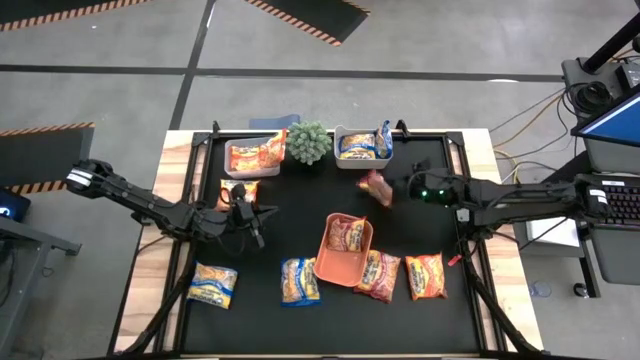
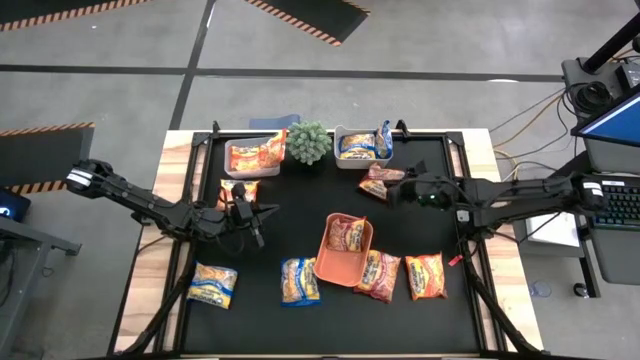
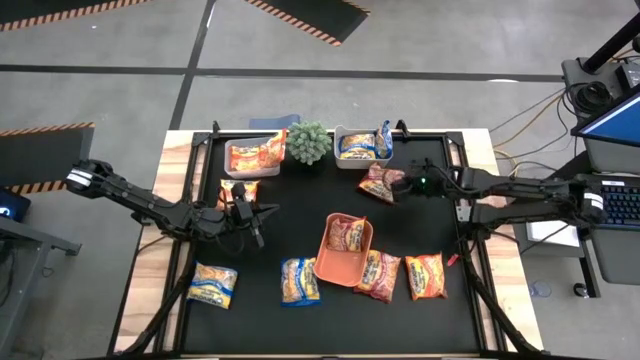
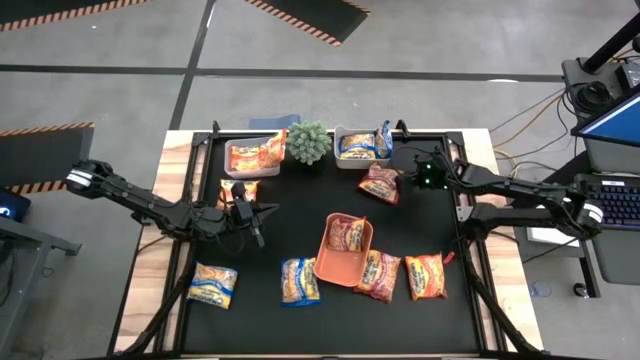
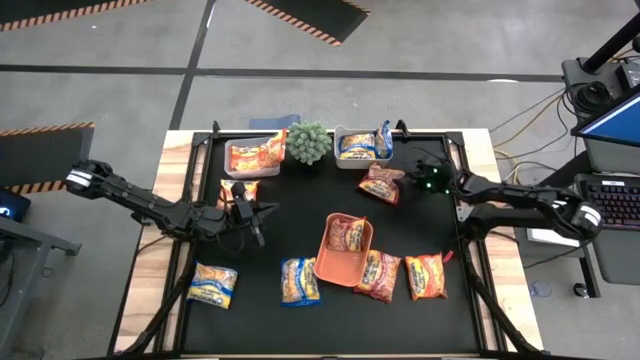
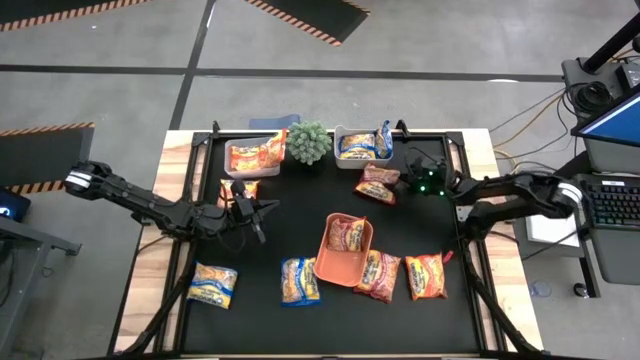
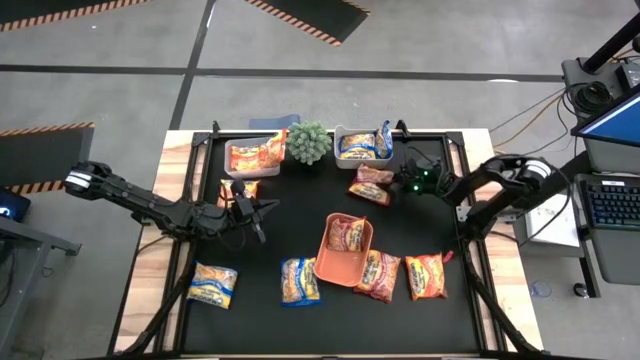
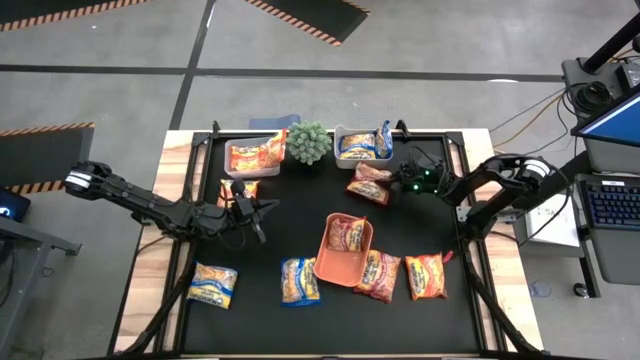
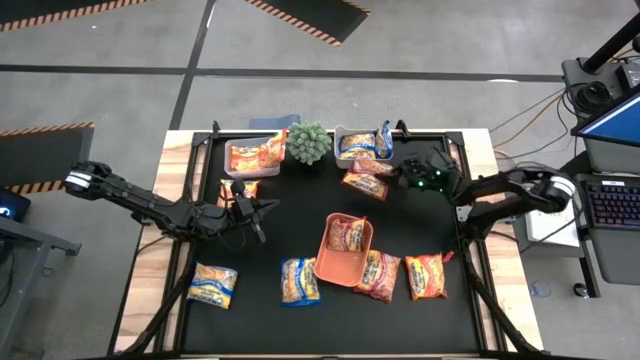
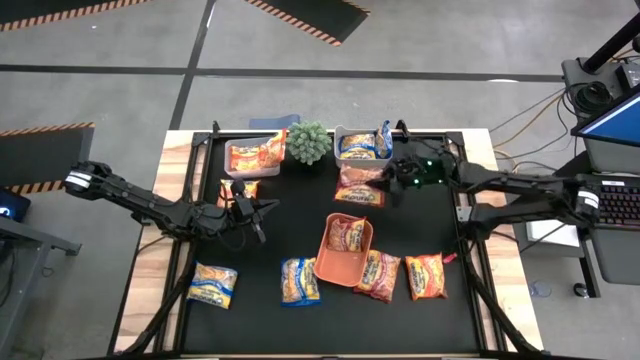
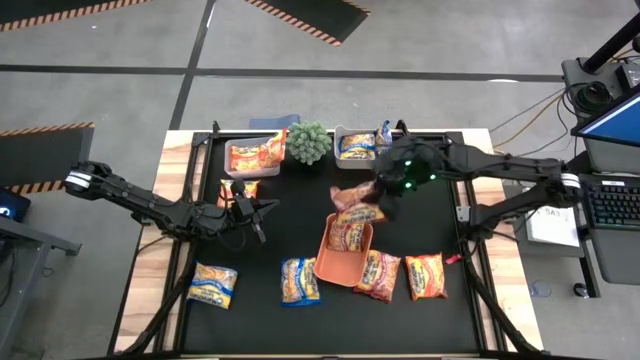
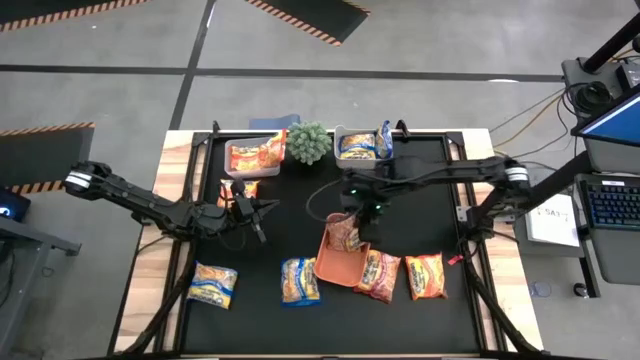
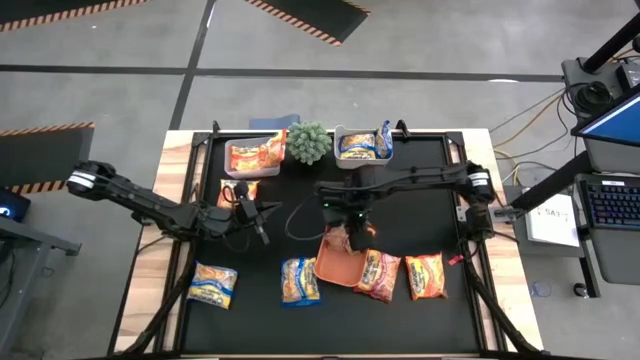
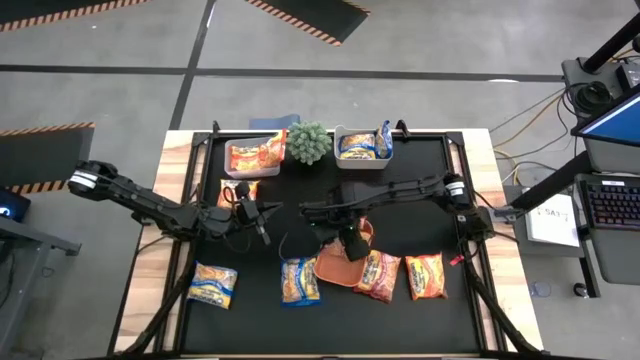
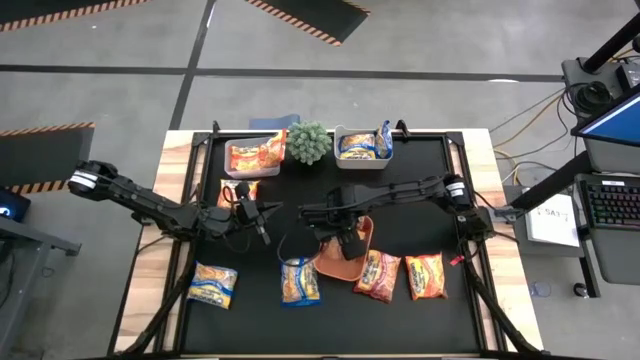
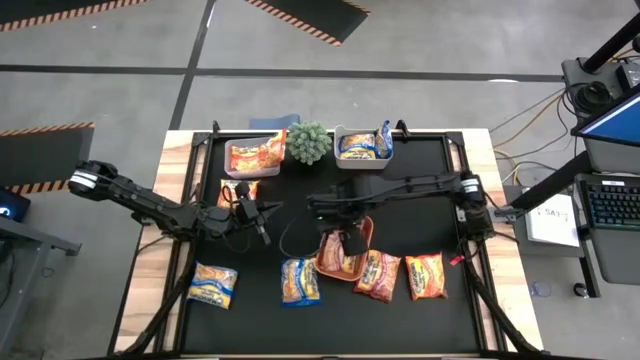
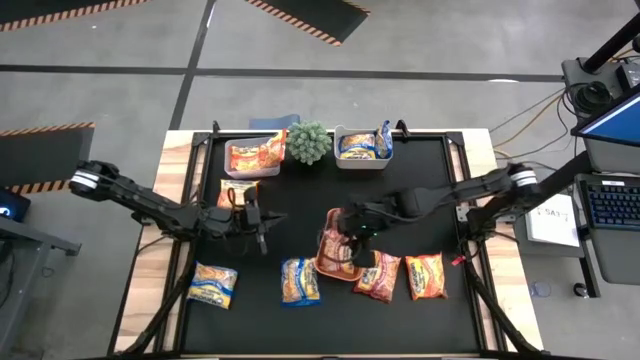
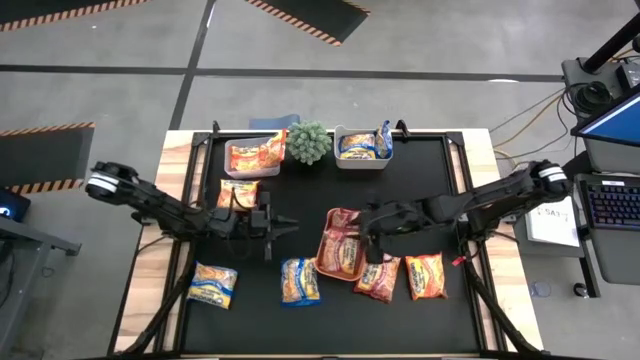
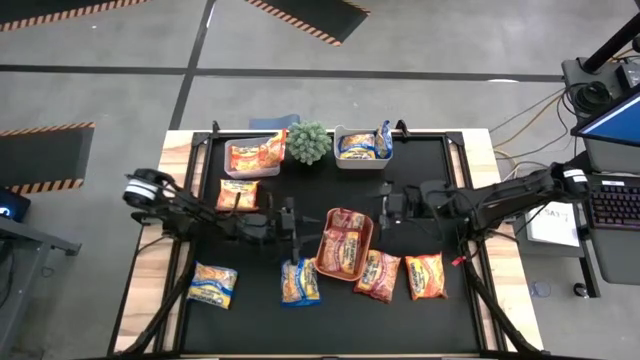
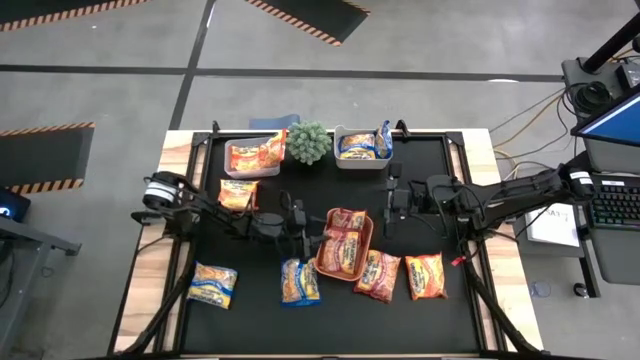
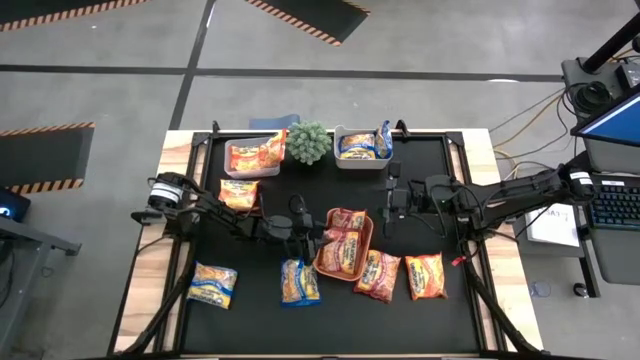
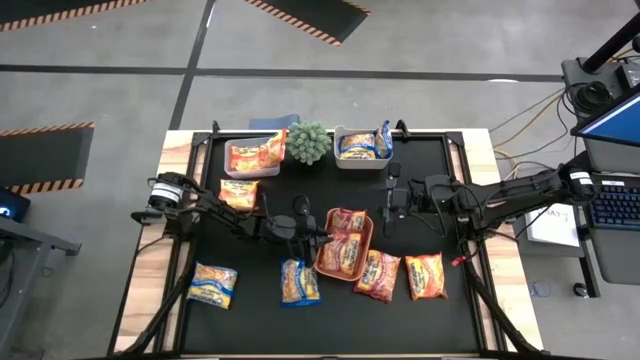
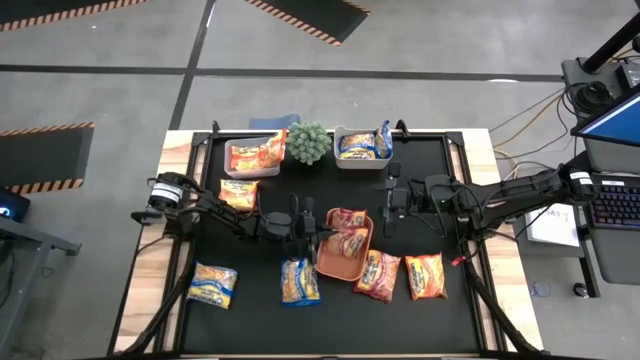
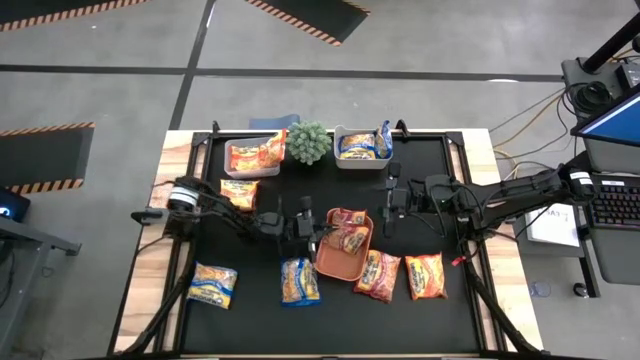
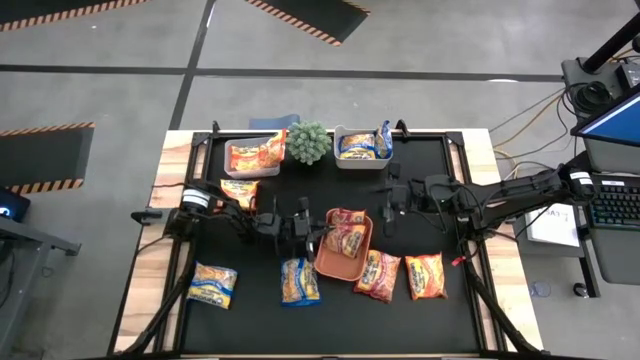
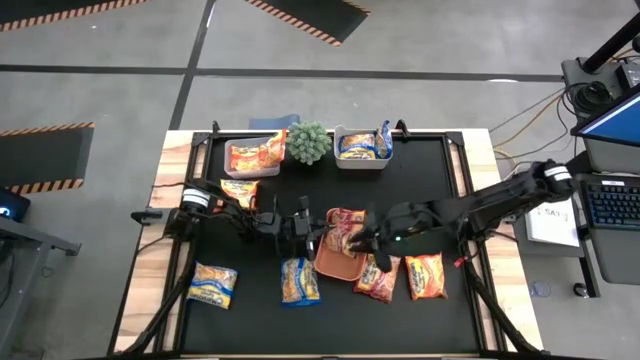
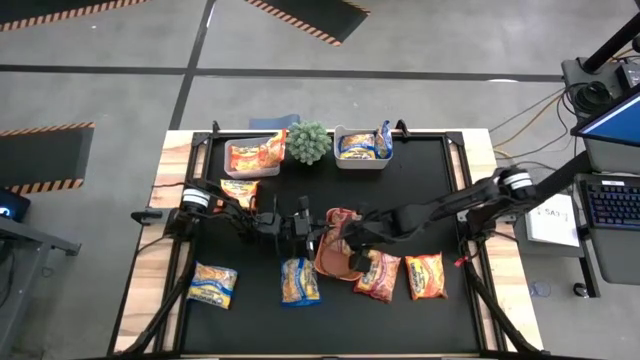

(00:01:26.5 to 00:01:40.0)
Task: Sort Maruchan noodles
Put the red noodle pack into the orange bin

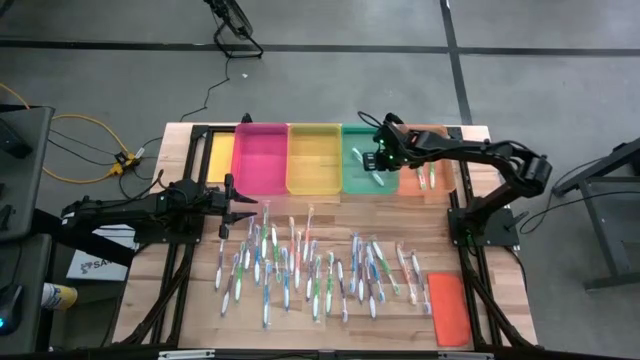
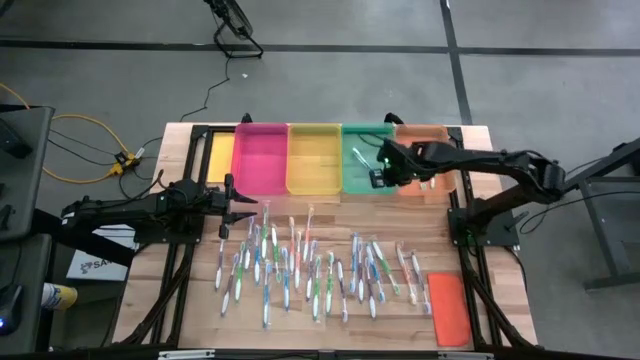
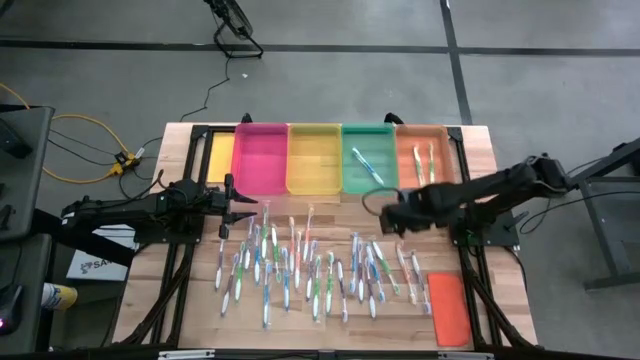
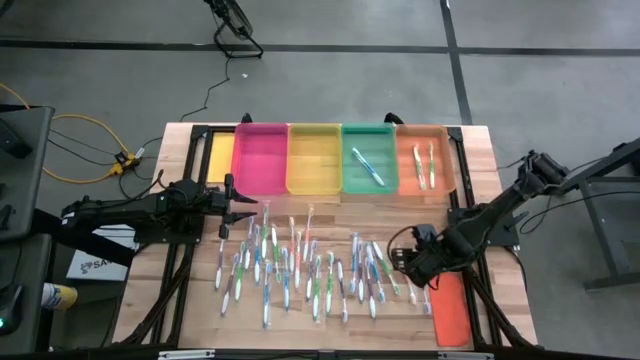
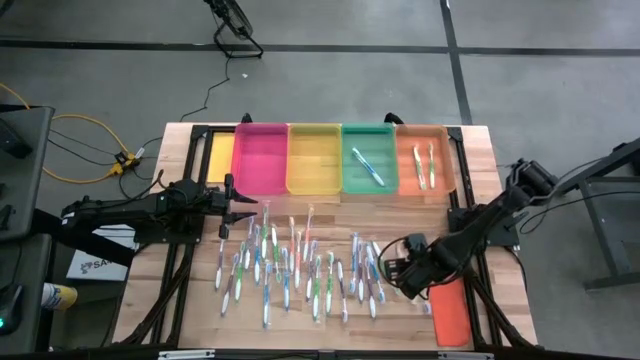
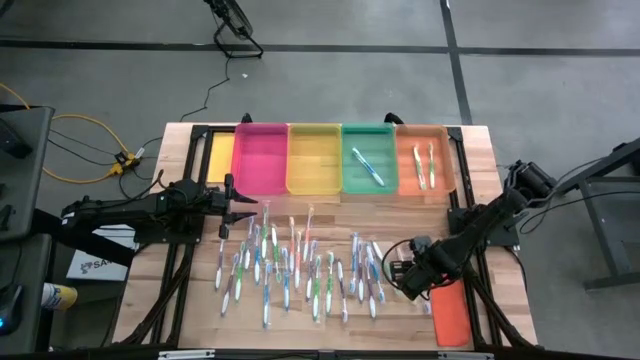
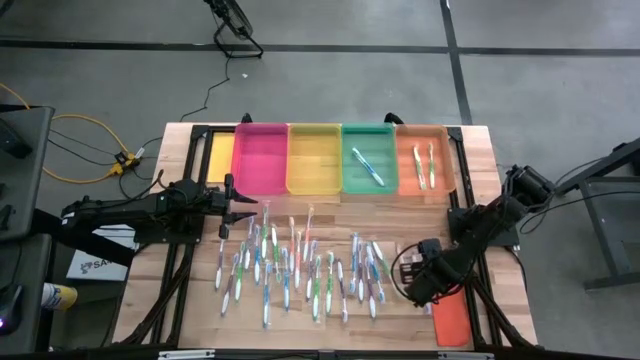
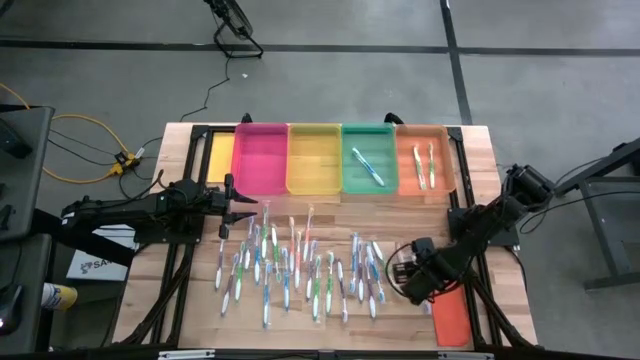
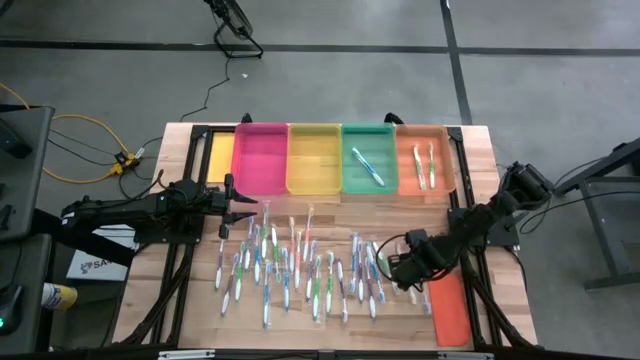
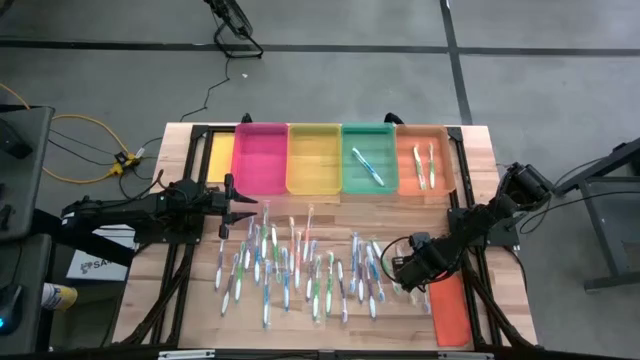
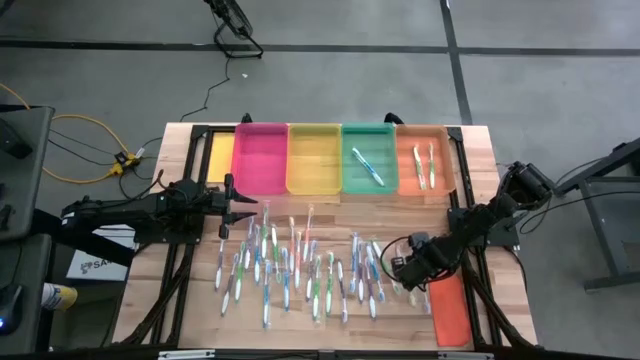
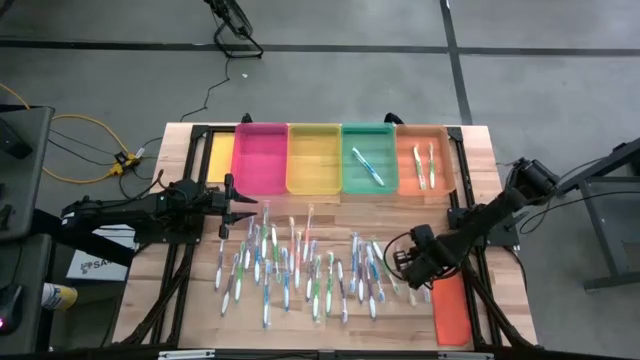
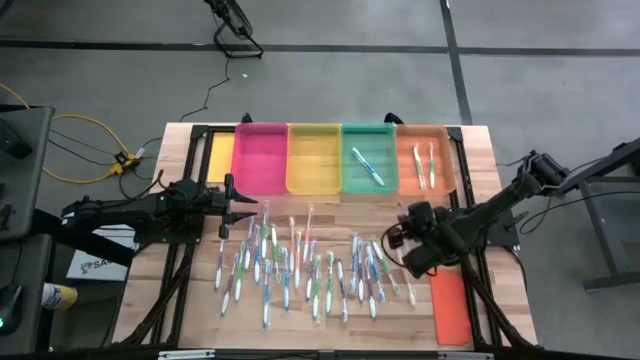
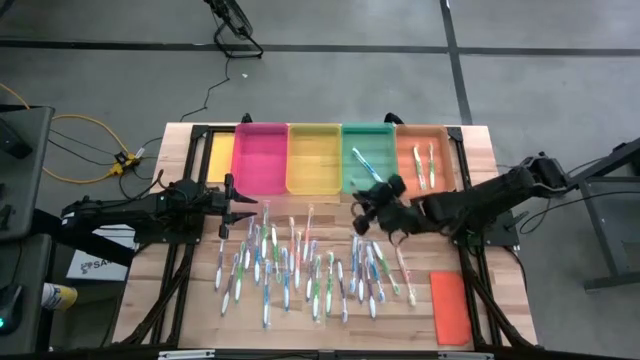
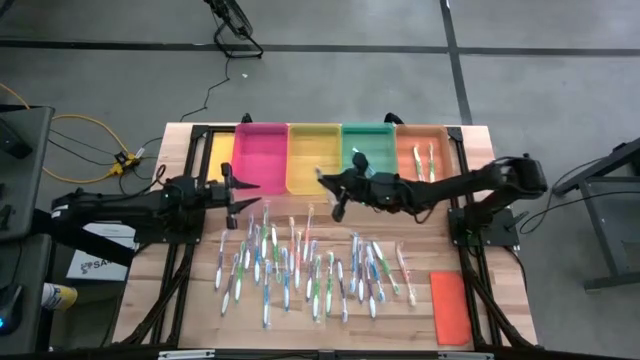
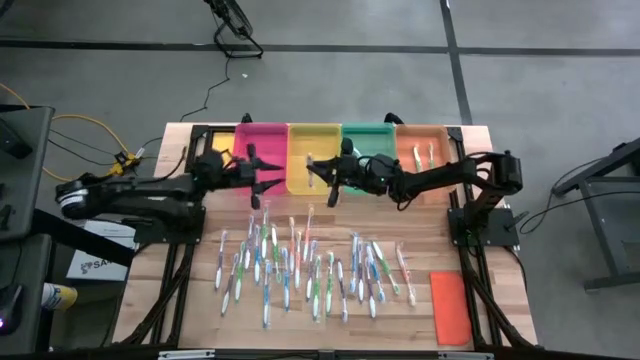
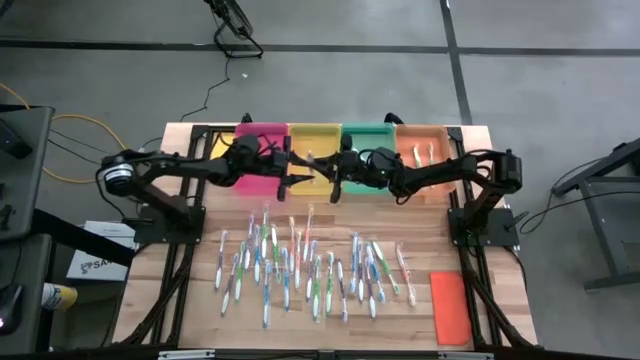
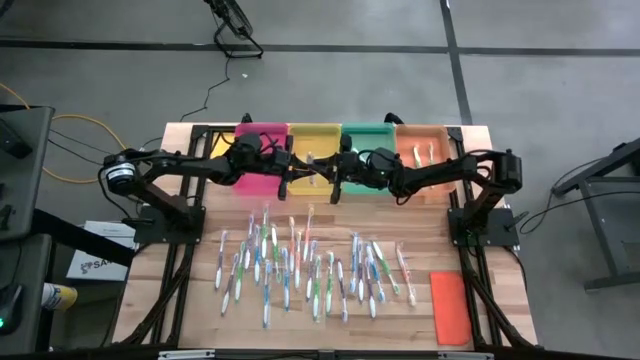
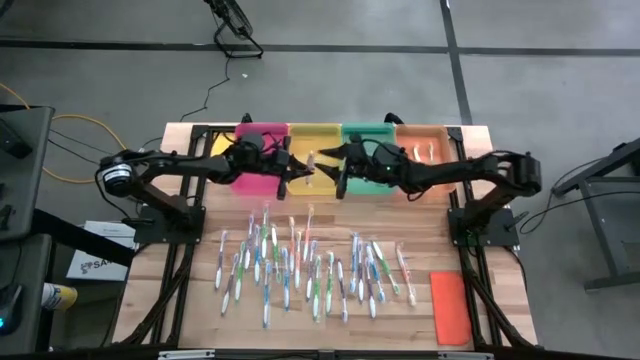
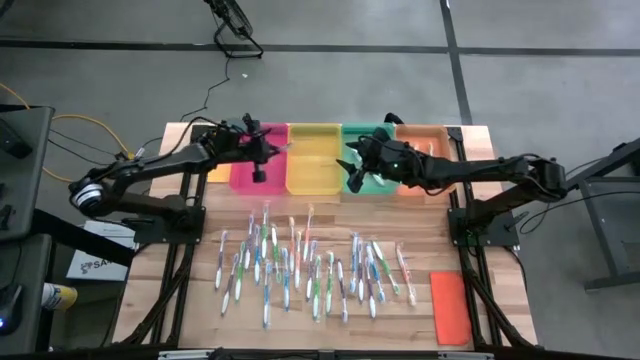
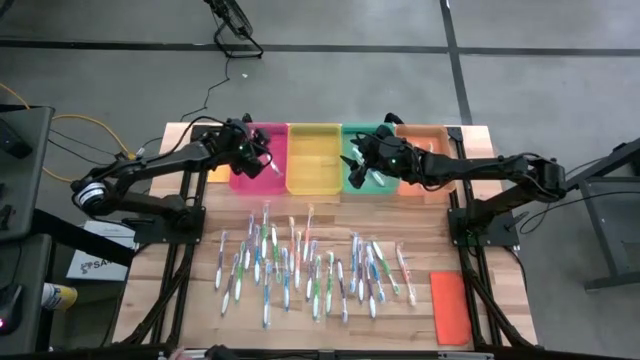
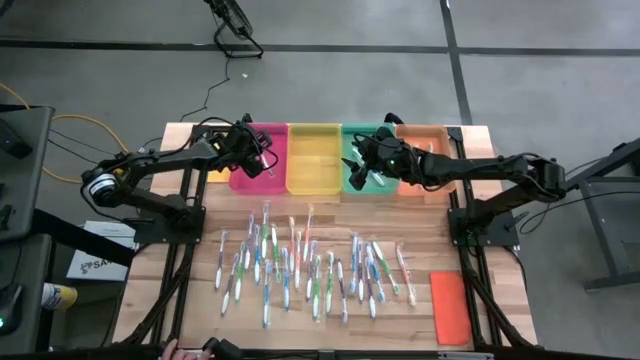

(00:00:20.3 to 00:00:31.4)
Task: Pick & Place Toothbrushes
Put the purple toothbrush into the pink bin
